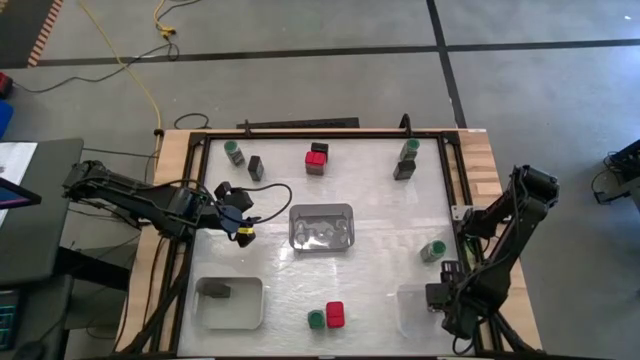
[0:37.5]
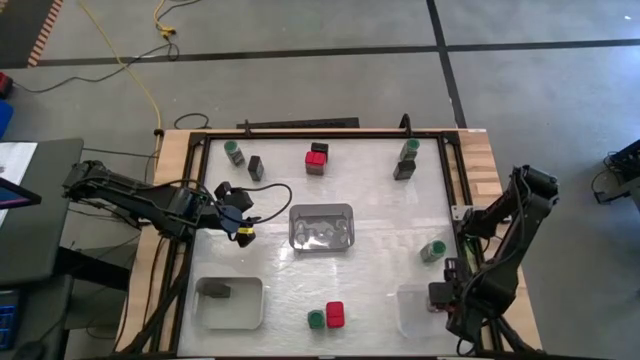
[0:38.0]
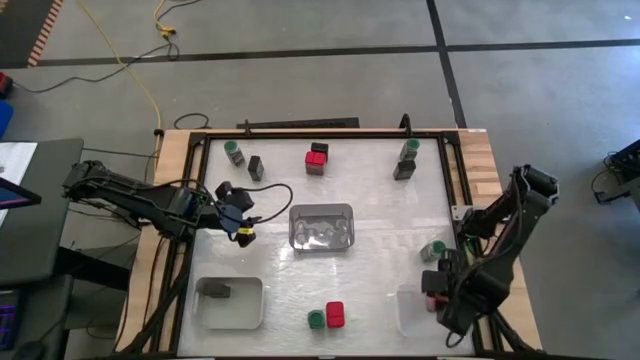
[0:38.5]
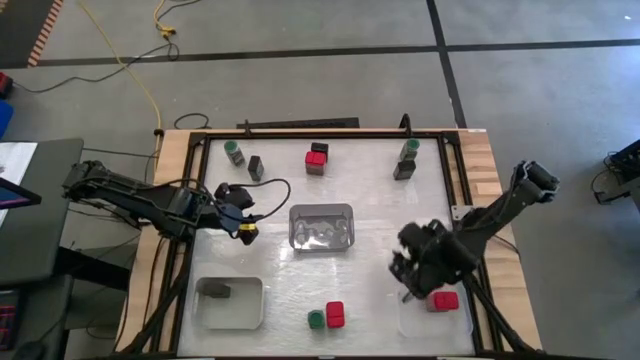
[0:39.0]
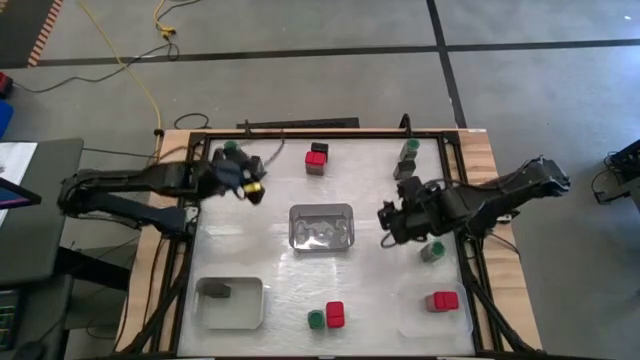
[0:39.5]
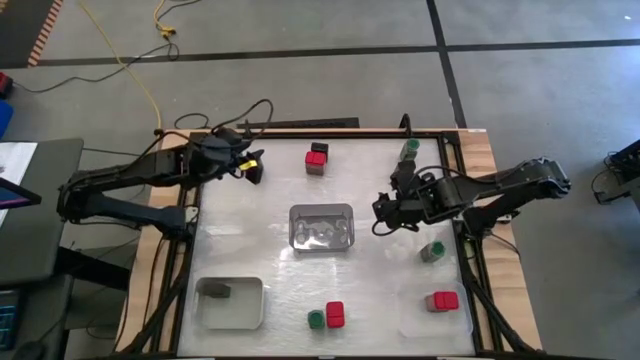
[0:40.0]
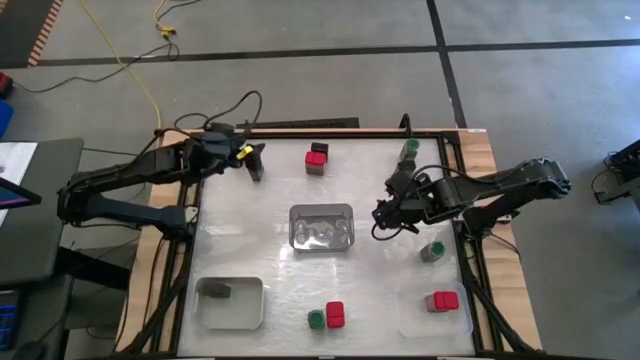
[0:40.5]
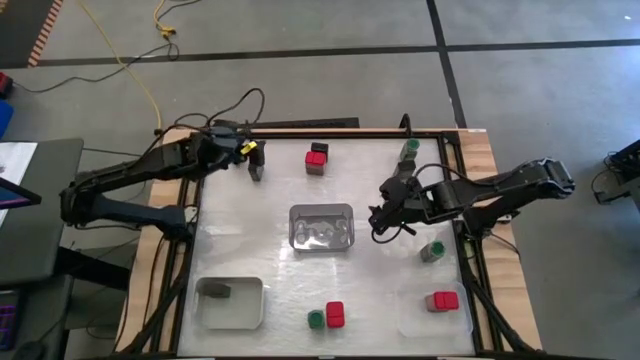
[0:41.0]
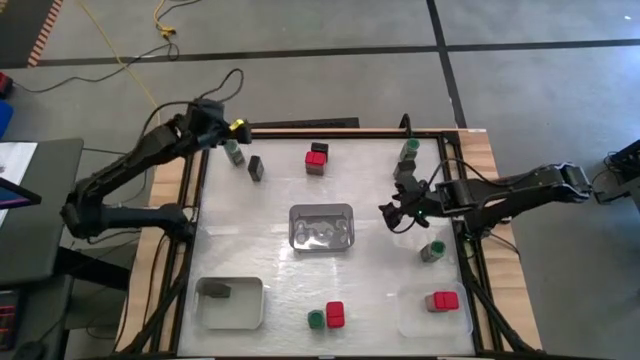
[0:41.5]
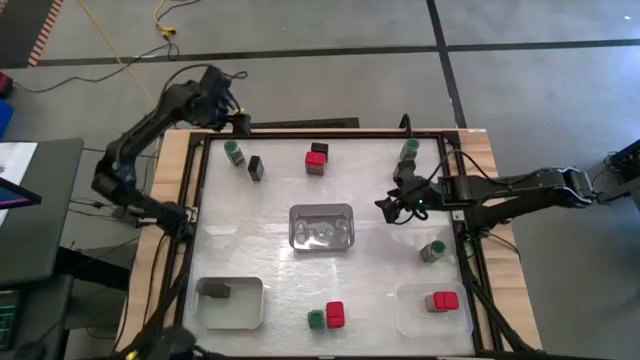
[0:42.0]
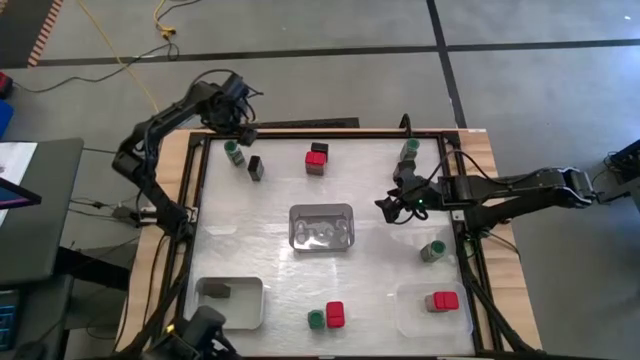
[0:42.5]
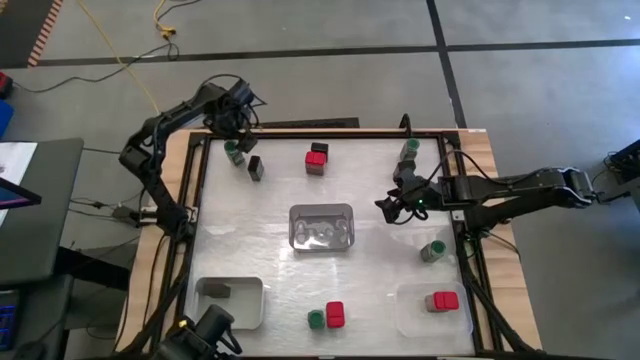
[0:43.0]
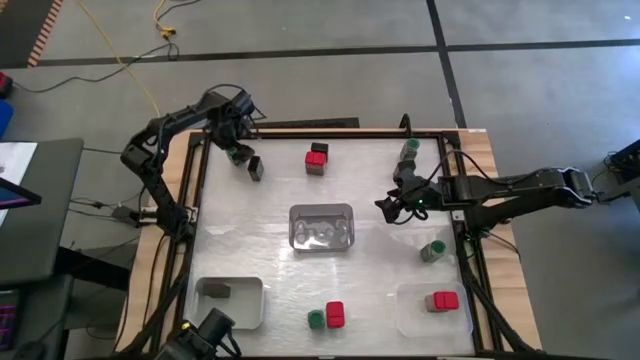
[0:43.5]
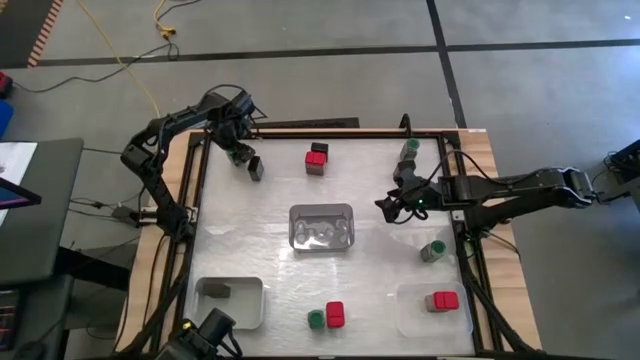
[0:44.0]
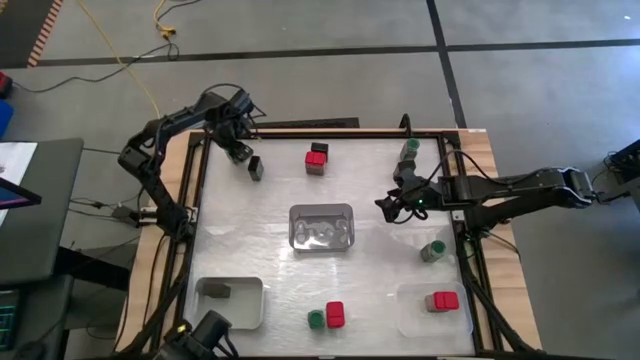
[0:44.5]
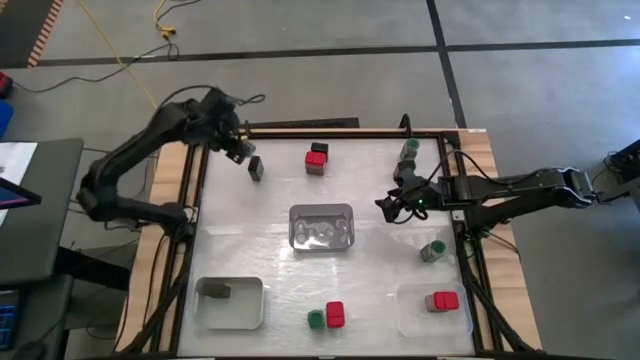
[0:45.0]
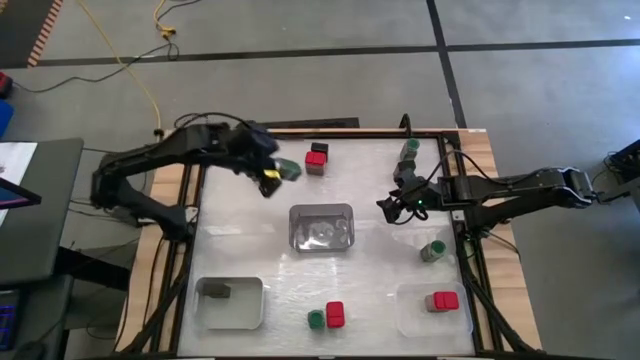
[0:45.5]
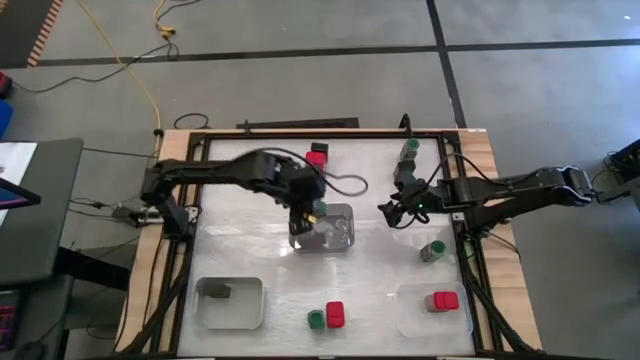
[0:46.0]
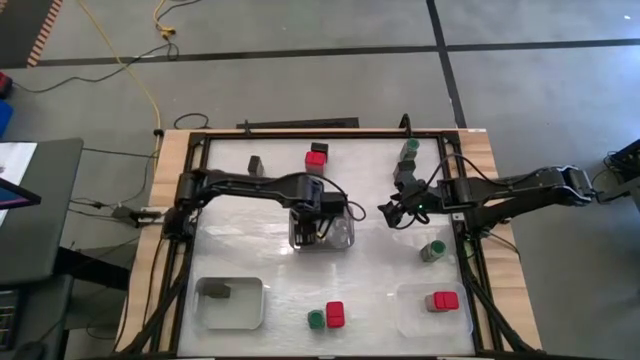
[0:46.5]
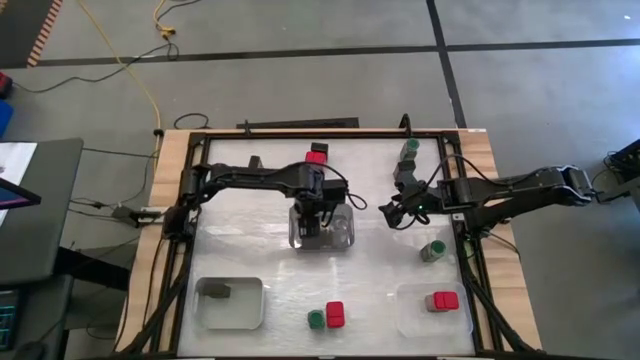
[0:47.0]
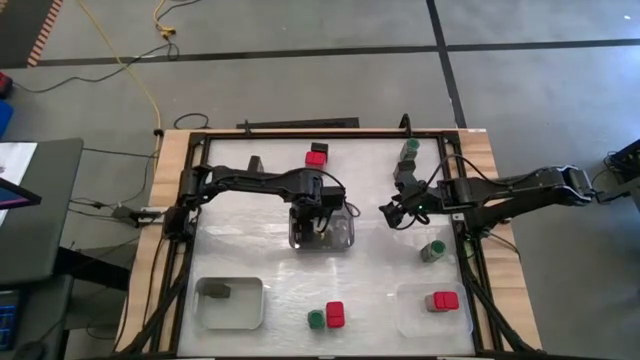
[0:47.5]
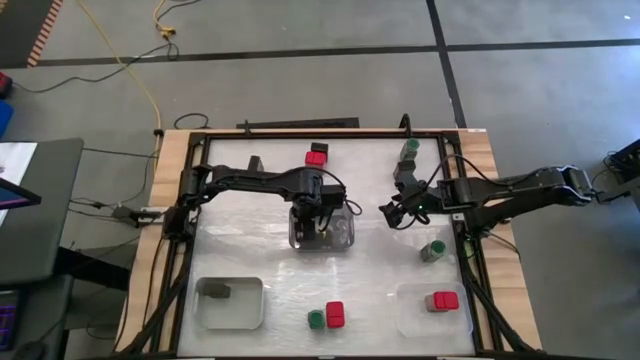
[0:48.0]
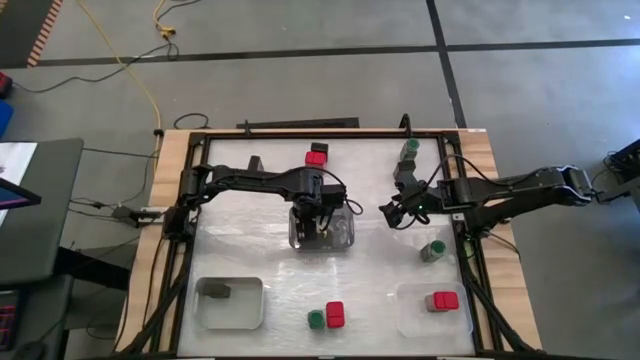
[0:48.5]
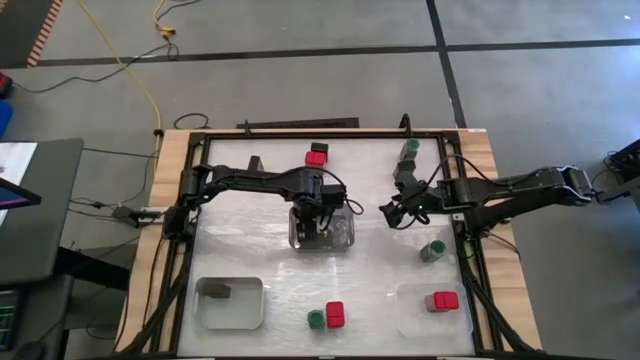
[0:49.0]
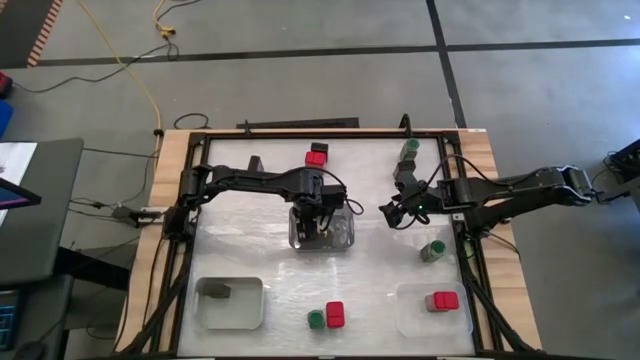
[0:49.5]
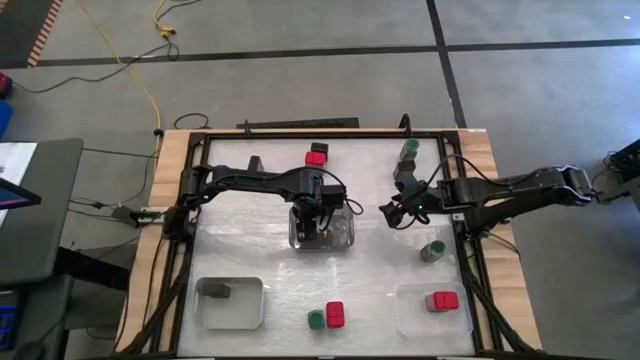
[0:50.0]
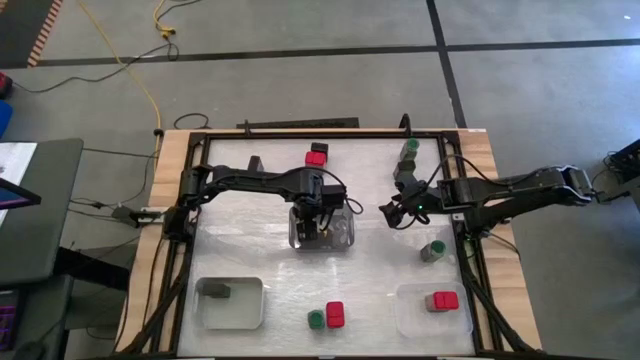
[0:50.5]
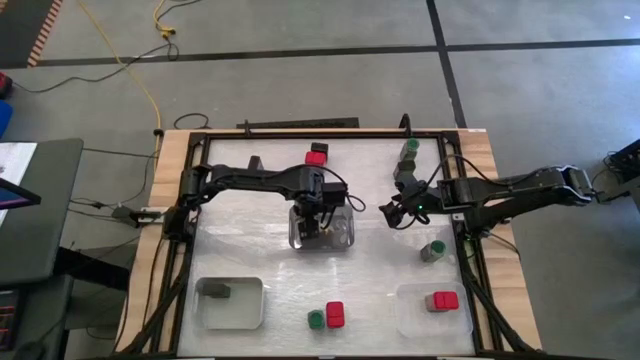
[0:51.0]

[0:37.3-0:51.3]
Task: Sort spices by type
Put the top left green seasoning bottle into the black bin

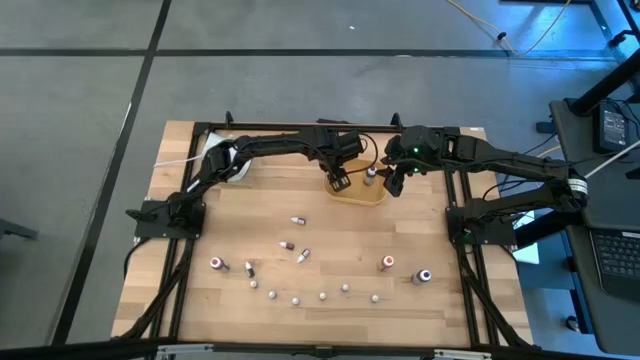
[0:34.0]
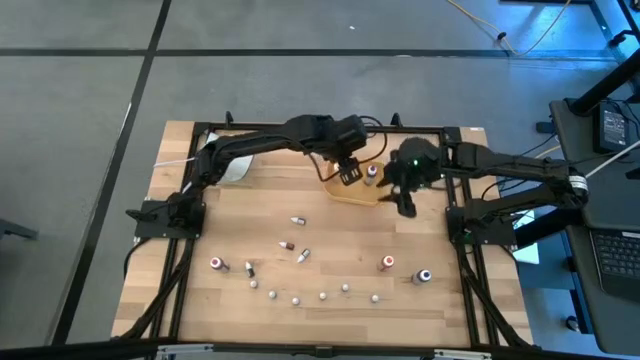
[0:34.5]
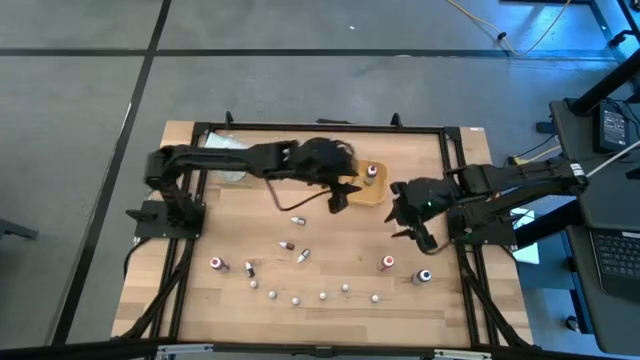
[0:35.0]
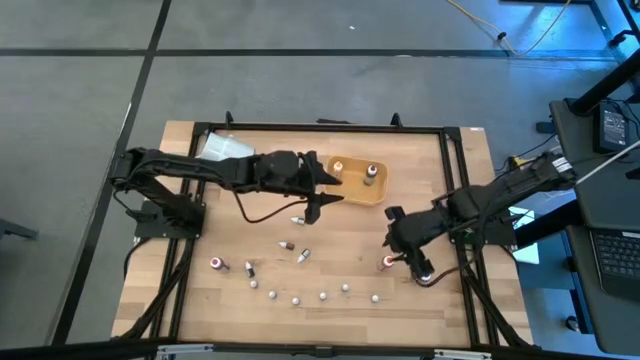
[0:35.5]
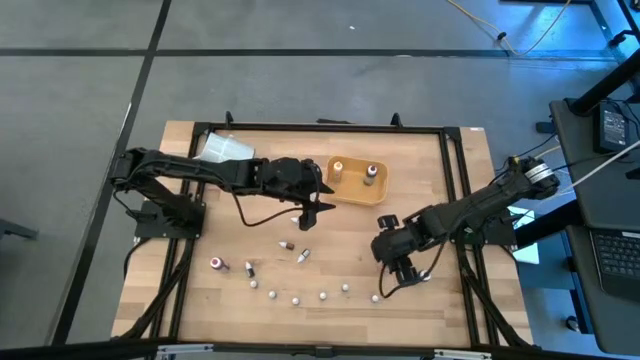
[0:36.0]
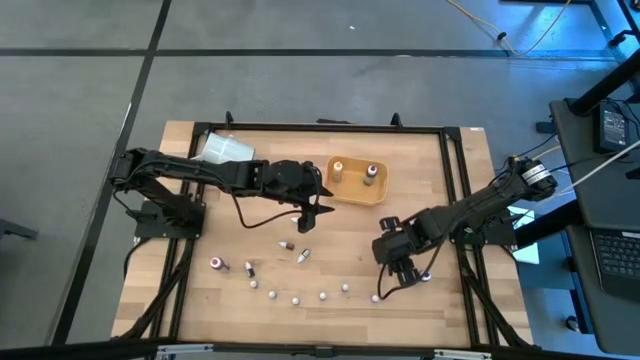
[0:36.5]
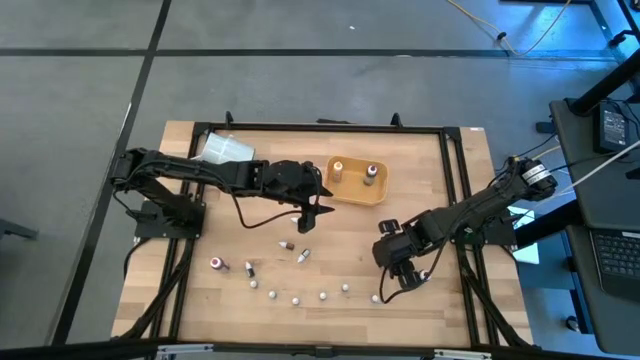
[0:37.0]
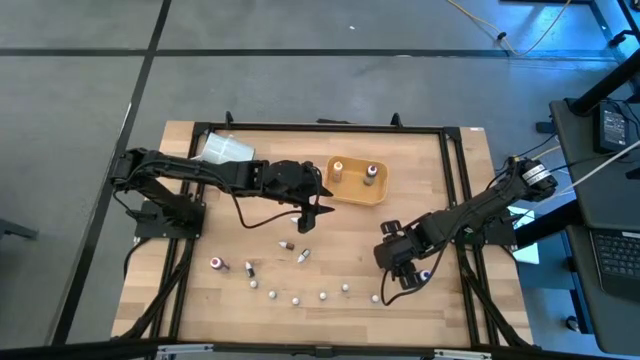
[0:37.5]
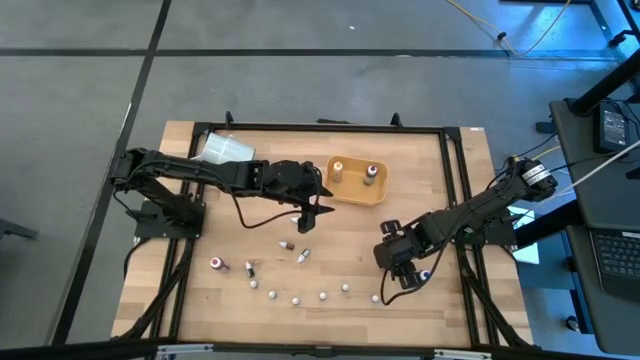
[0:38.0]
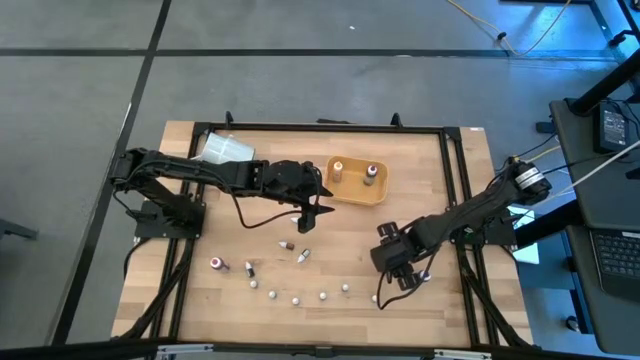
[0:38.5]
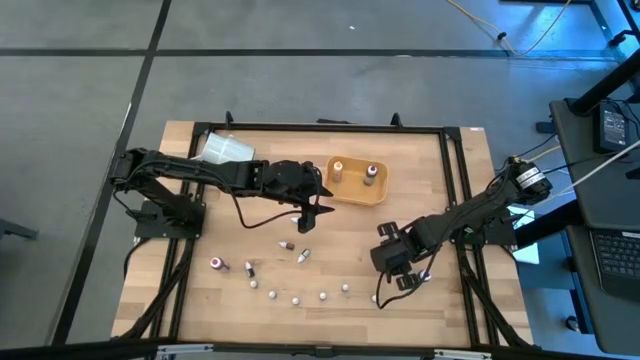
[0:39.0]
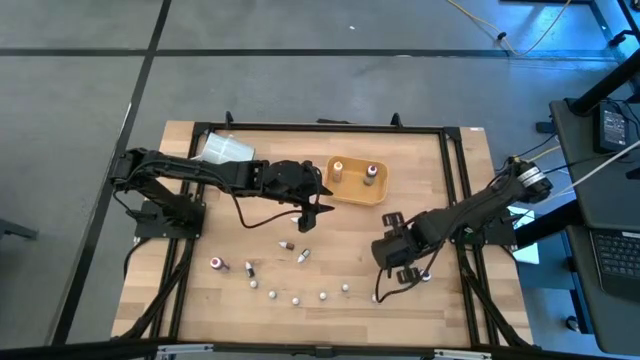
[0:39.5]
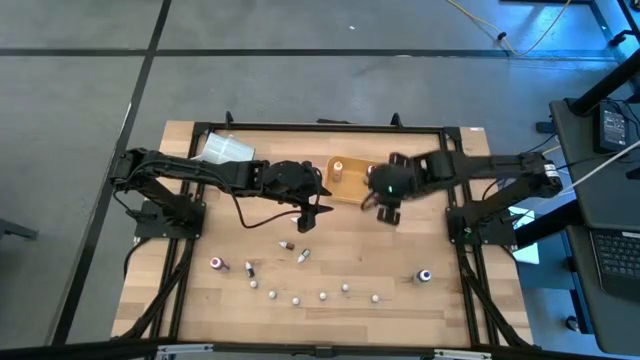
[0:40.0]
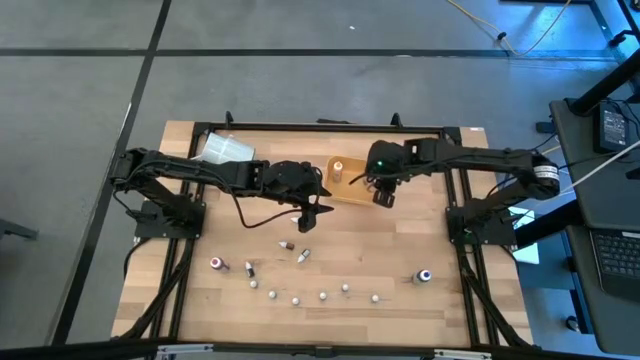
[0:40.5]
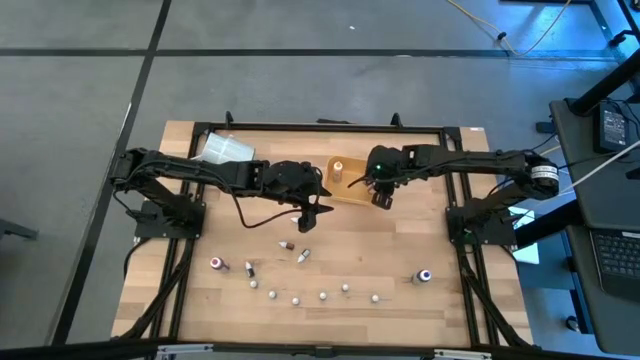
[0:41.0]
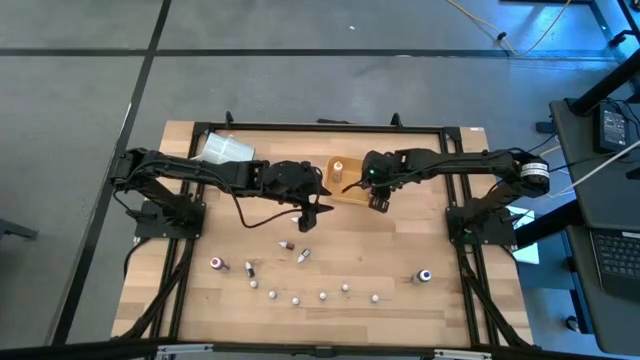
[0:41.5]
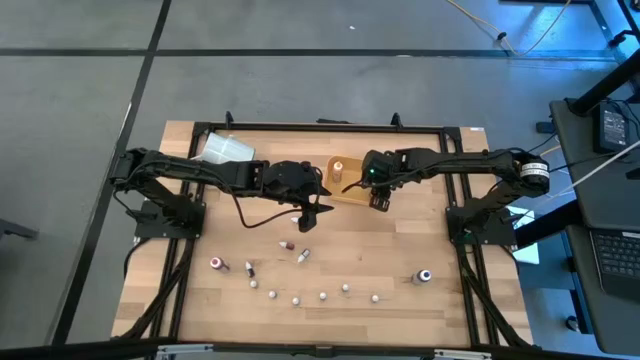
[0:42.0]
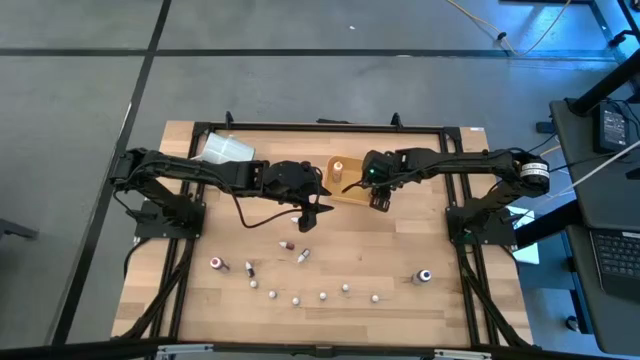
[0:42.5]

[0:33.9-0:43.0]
Task: Pick & Place food coloring
Put the large orange food coloring bottles into the yellow bin
